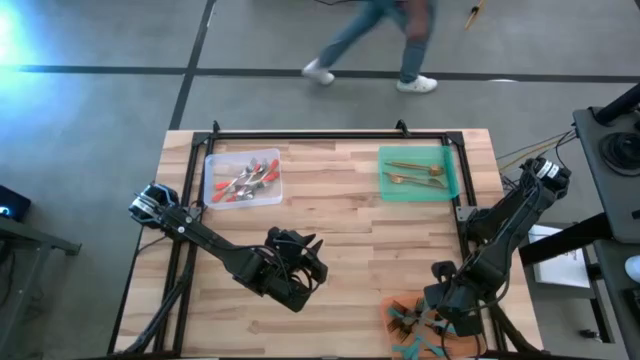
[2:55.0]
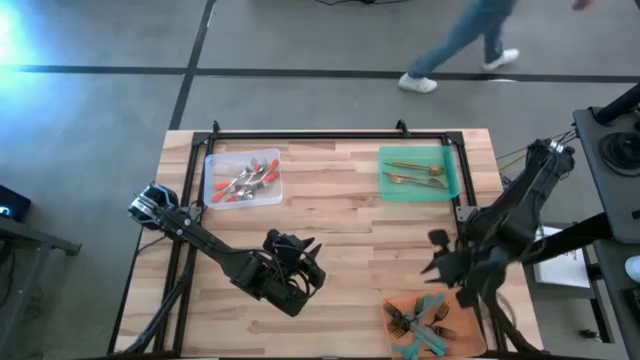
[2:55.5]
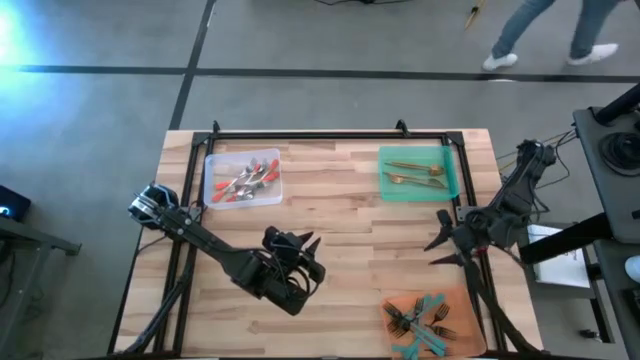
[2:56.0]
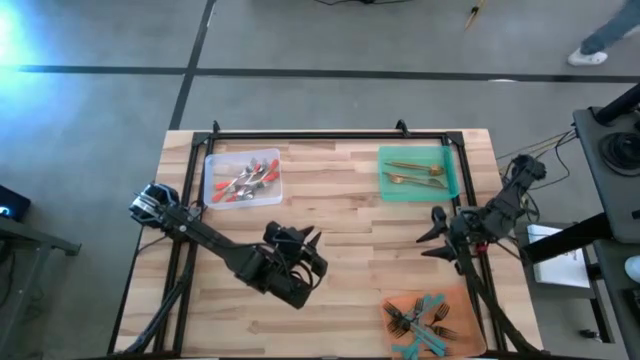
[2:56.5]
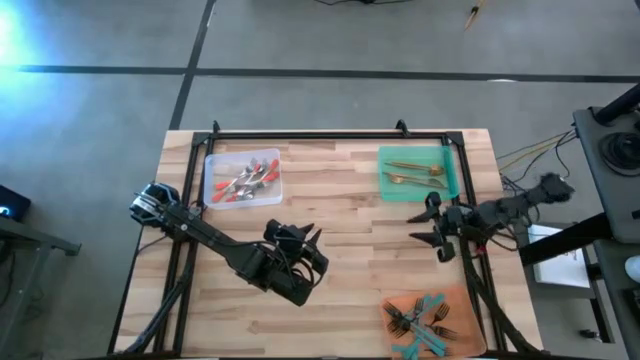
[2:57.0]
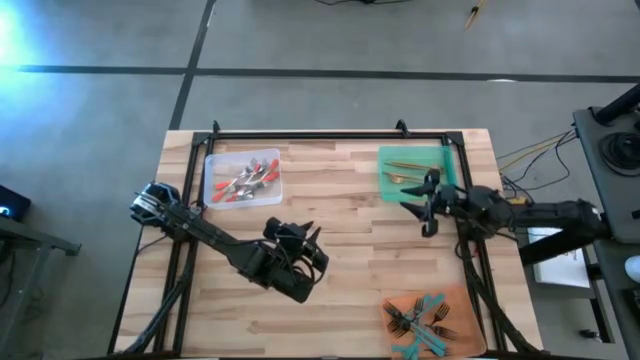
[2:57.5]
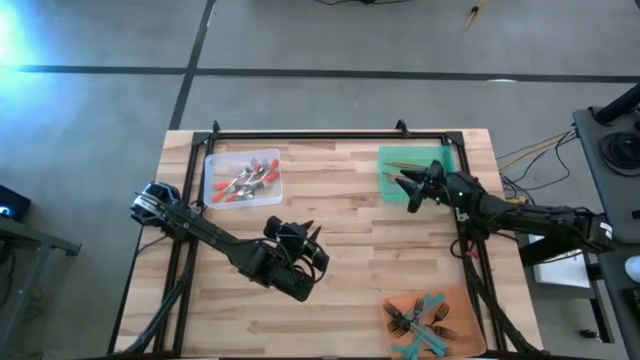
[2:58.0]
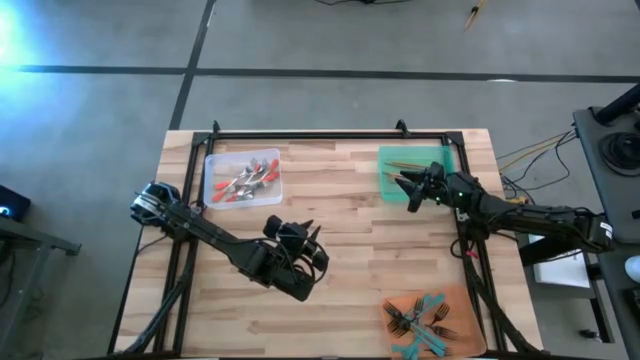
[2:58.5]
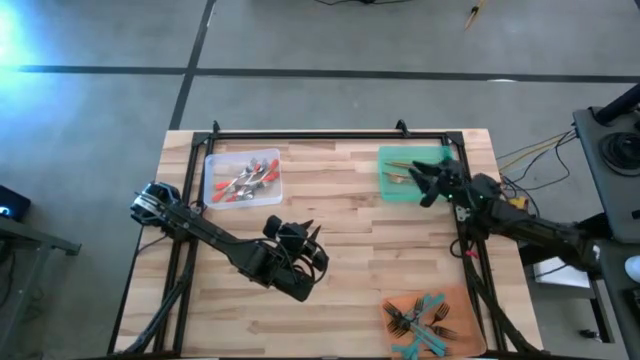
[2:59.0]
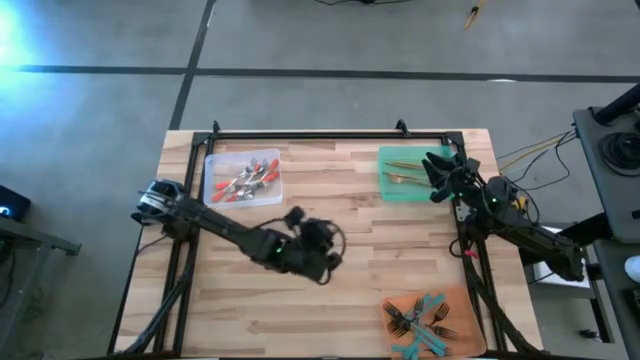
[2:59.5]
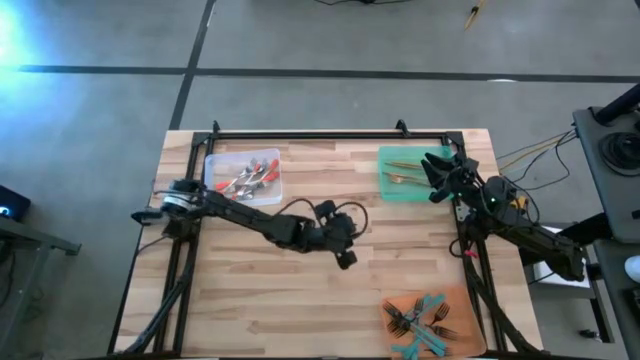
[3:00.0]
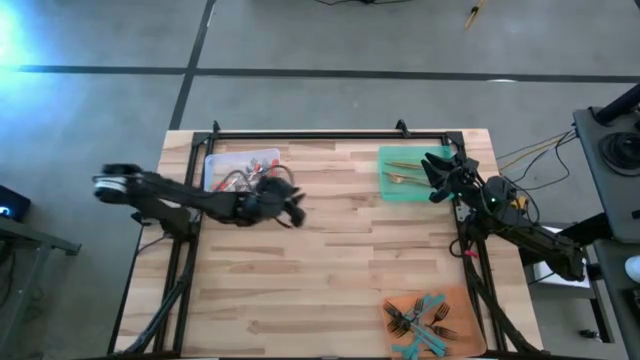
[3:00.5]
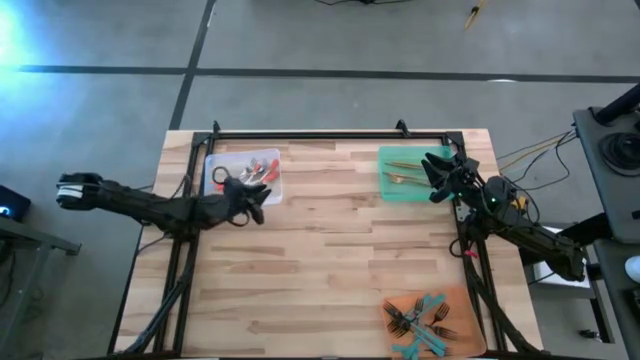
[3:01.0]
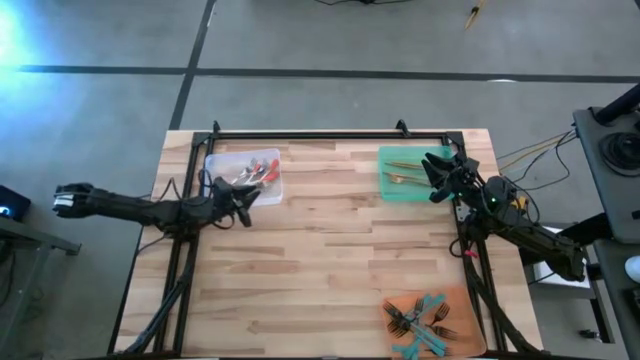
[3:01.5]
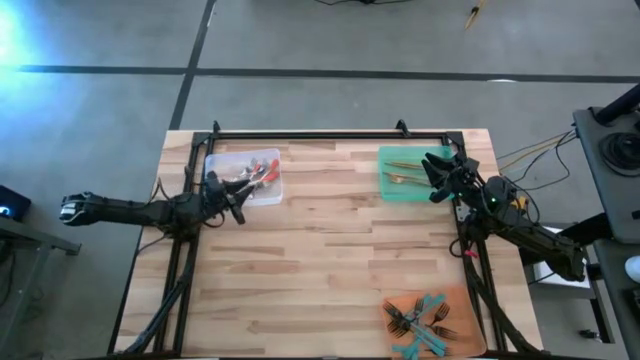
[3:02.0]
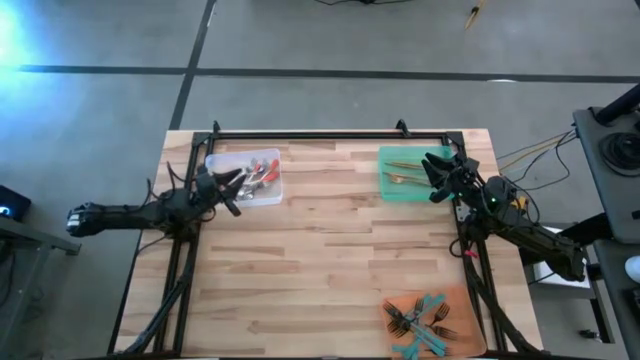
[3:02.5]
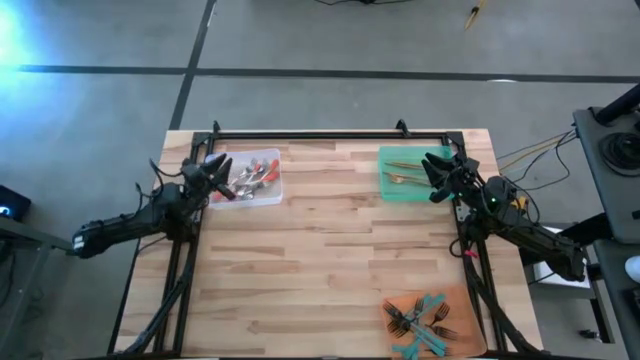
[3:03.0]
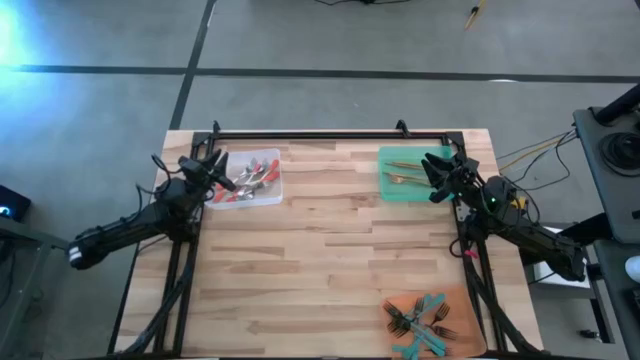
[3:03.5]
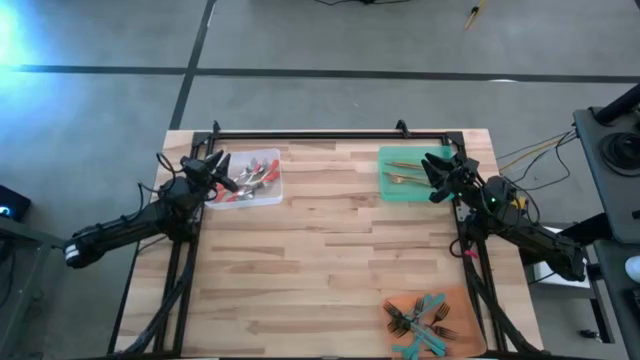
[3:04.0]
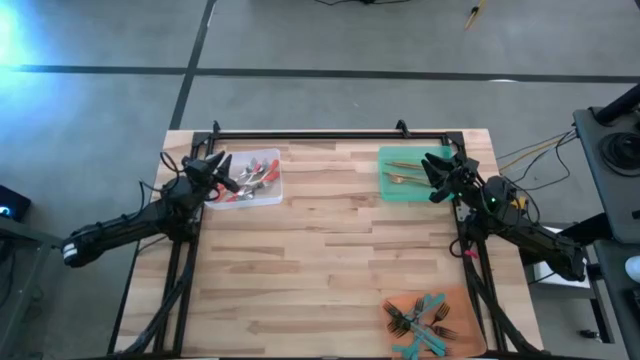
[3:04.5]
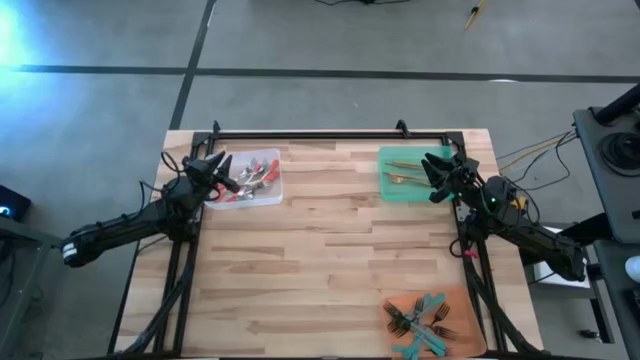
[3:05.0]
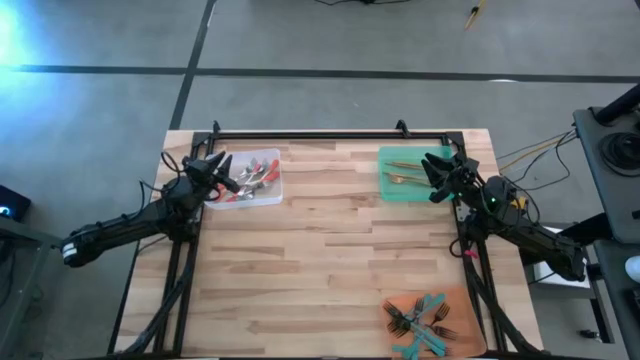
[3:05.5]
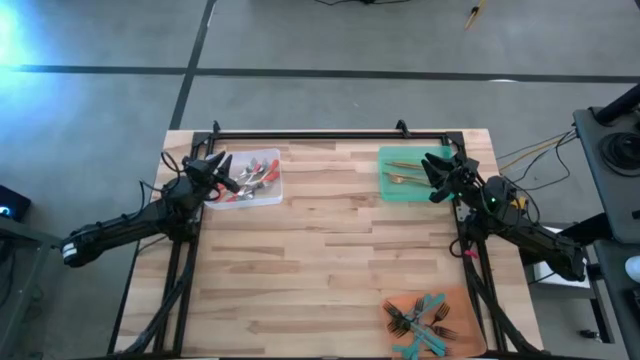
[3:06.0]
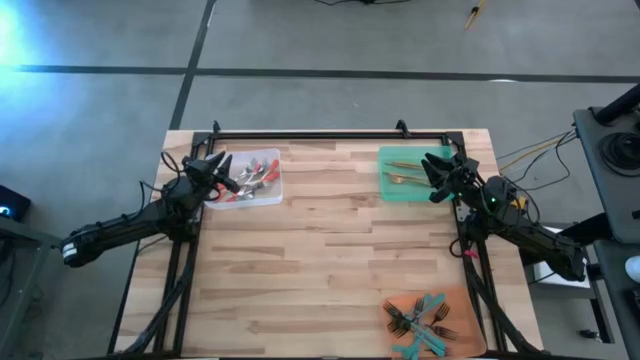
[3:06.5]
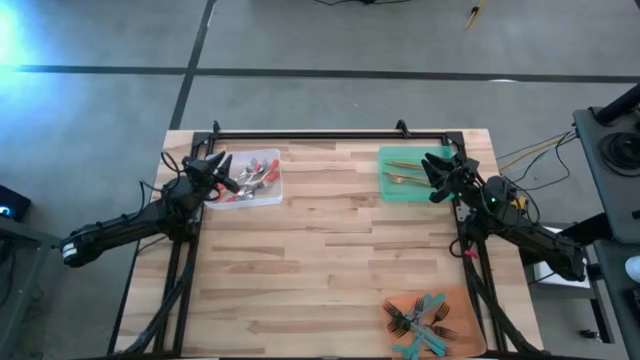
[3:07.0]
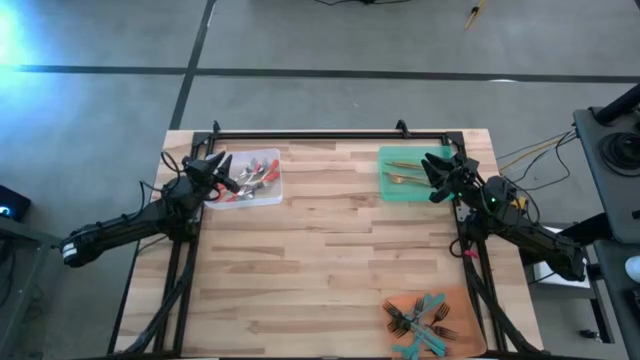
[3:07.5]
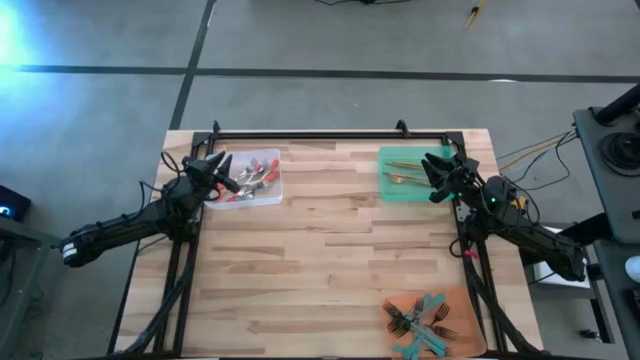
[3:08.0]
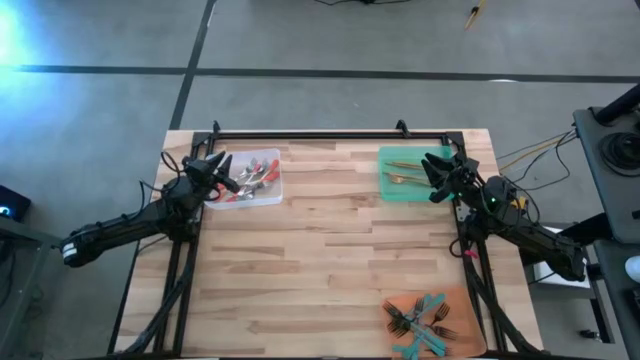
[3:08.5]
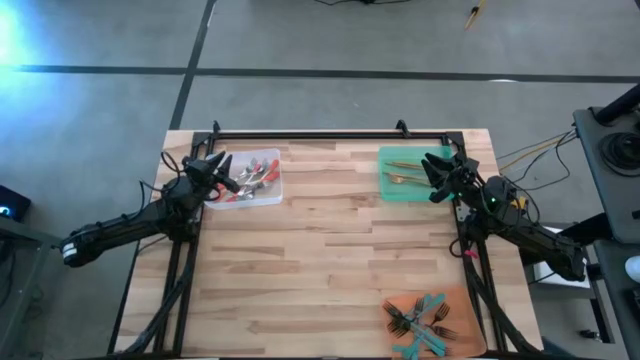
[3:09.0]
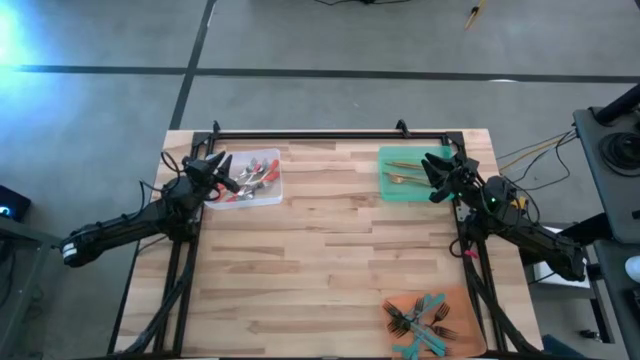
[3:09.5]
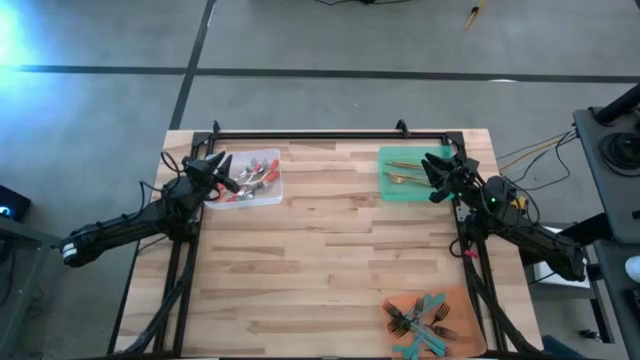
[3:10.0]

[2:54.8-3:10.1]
Task: Sort silverware by color (type)
Return to Home Position

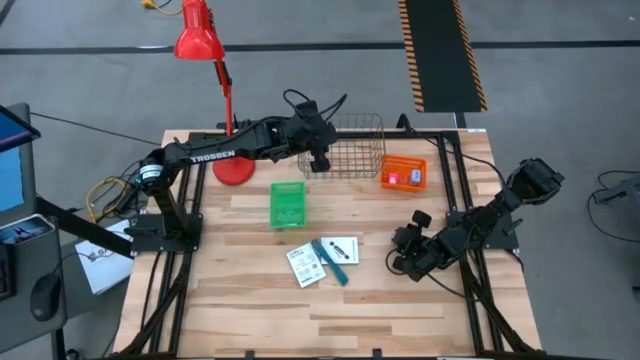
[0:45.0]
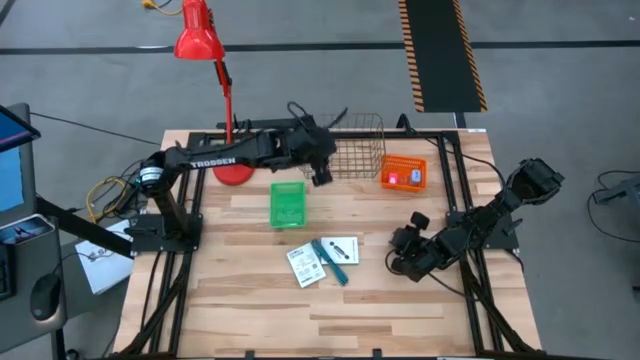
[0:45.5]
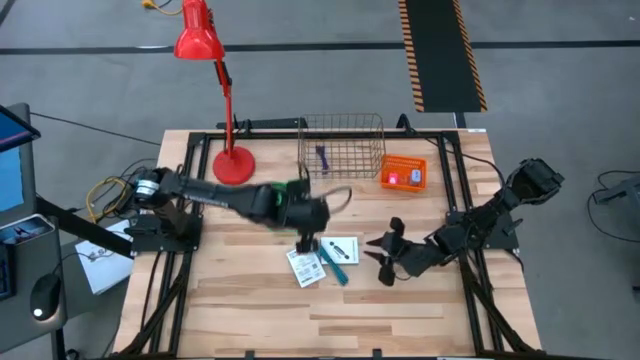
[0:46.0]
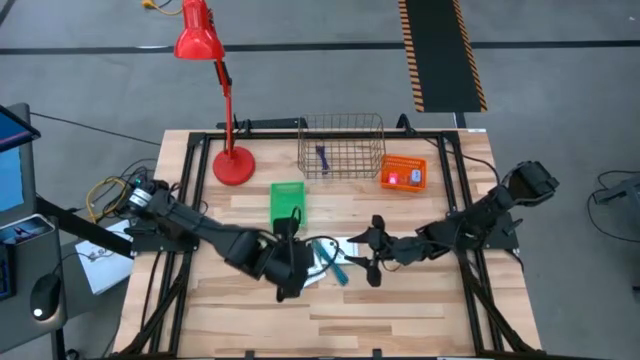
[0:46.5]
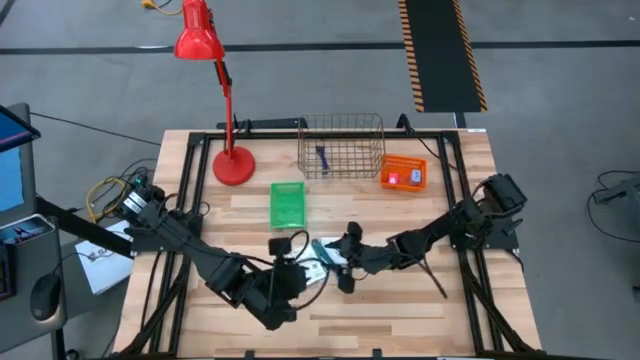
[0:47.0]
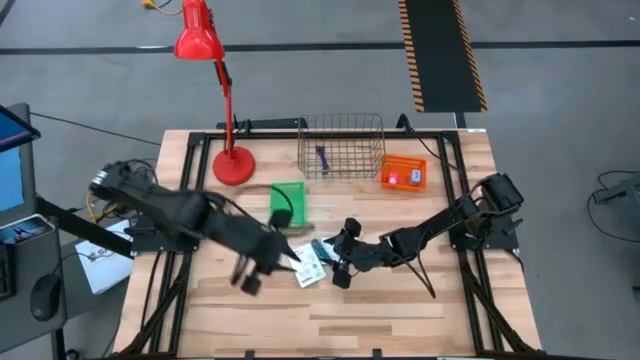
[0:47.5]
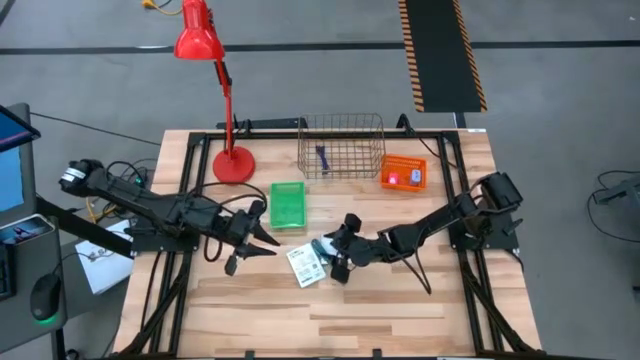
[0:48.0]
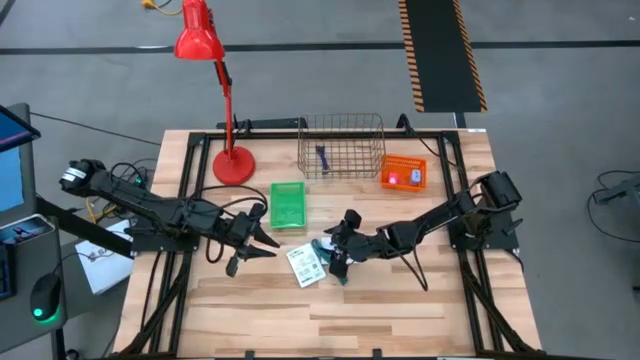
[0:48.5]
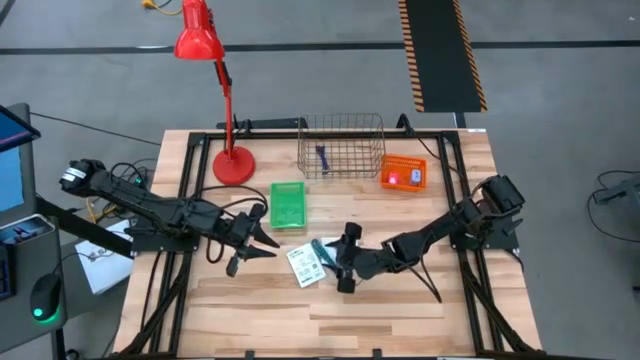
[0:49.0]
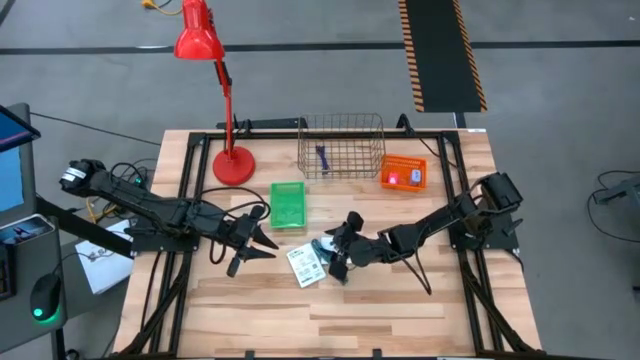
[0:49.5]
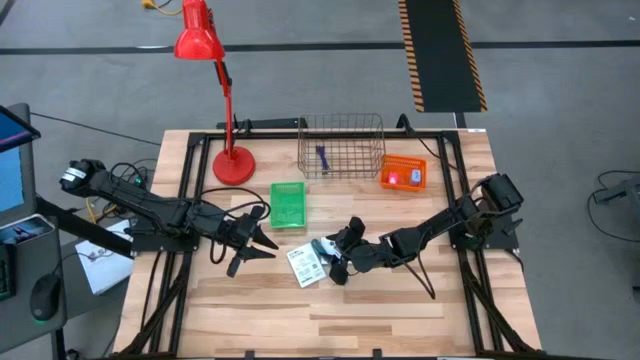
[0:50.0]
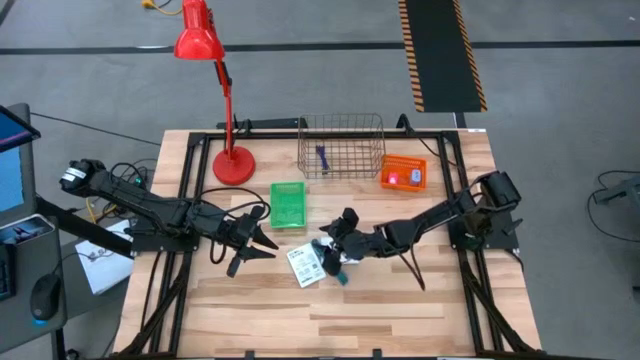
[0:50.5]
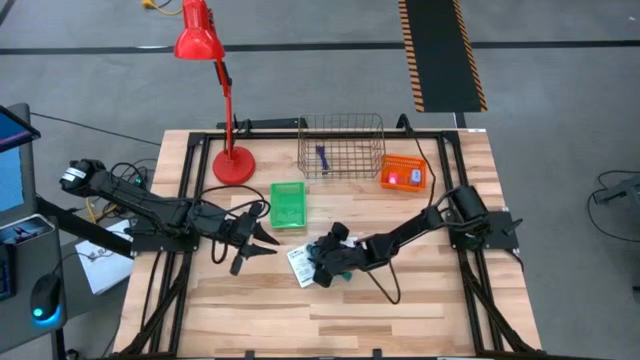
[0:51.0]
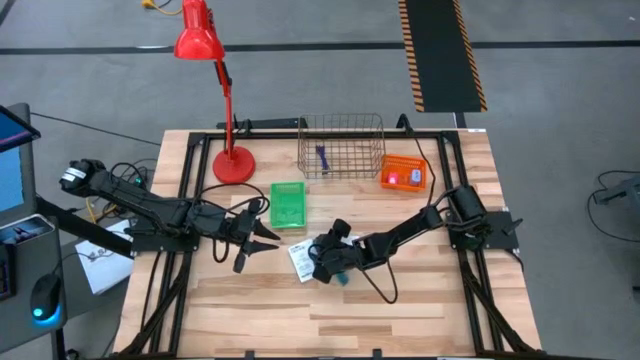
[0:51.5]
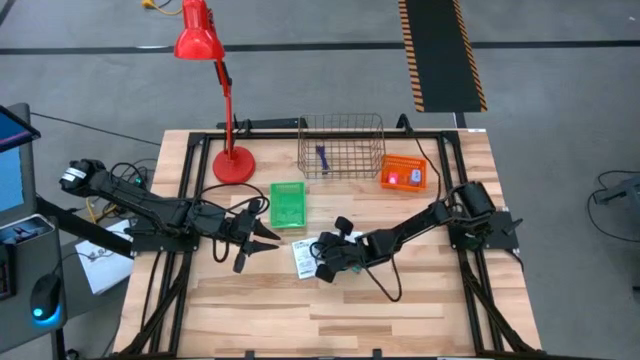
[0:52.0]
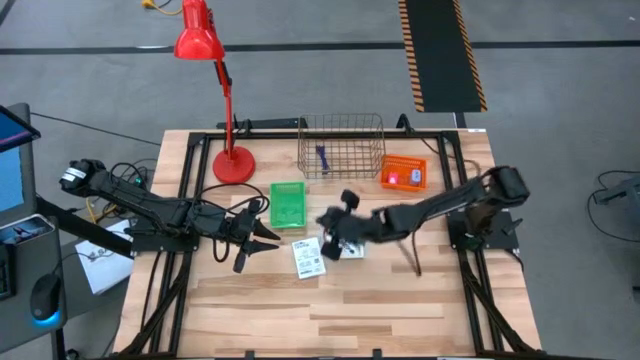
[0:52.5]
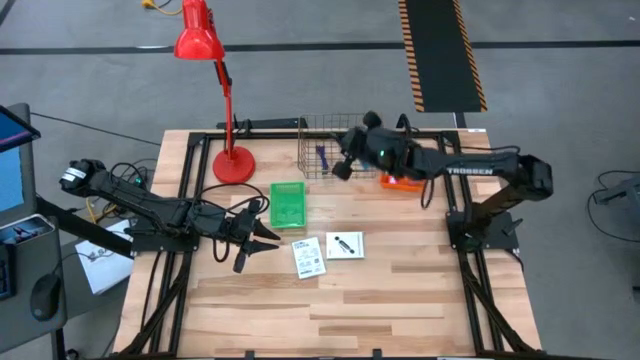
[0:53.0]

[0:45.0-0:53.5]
Task: Pick and place items into bin
Put the light blue charger cable into the wire basket
